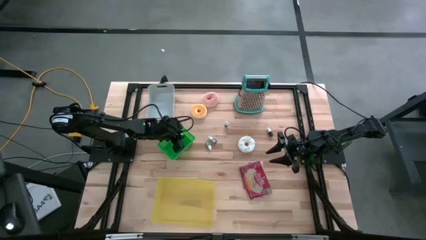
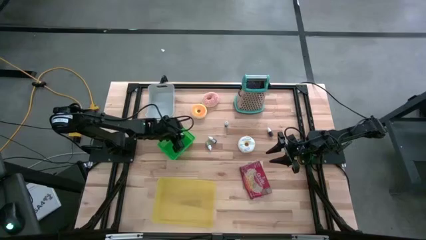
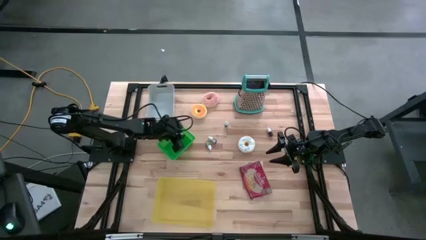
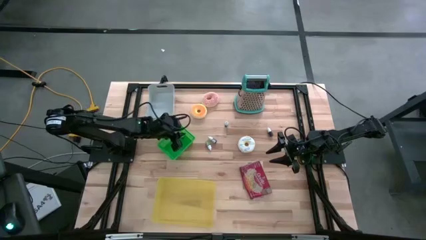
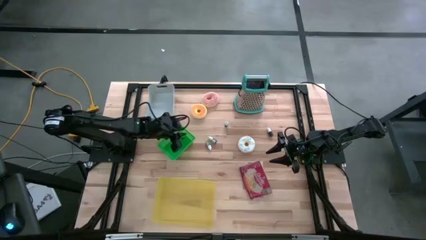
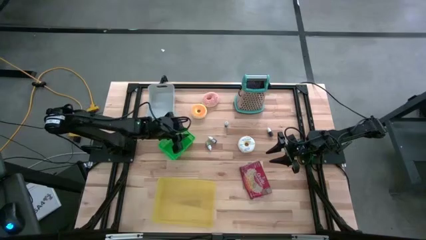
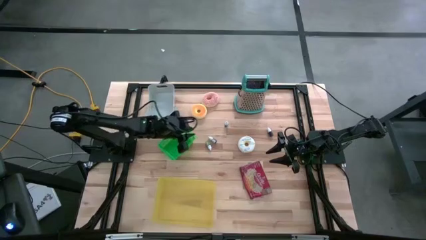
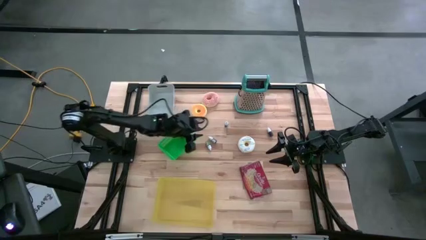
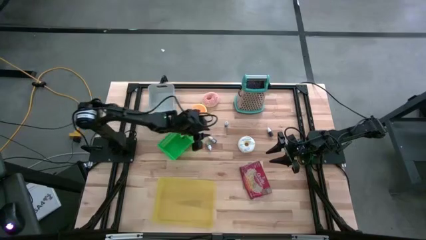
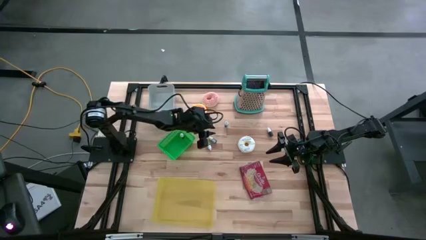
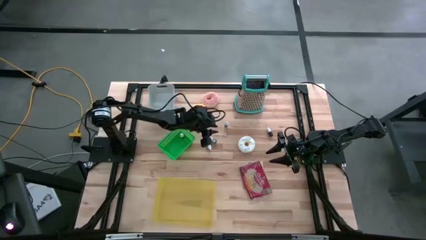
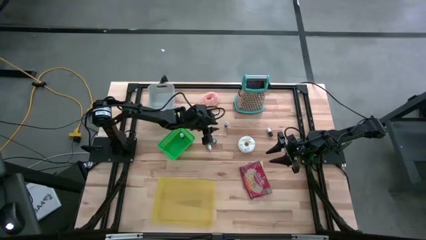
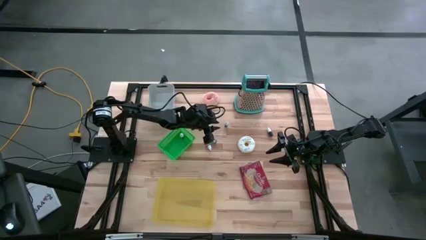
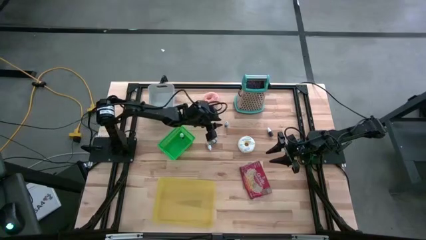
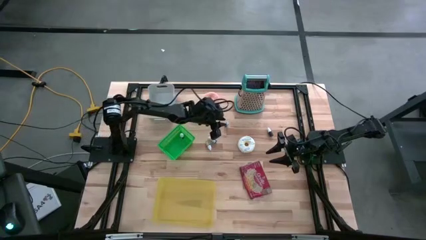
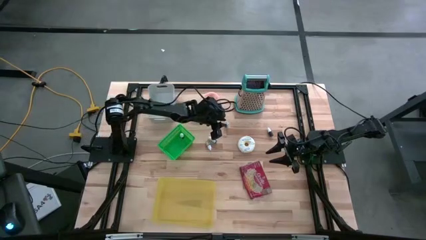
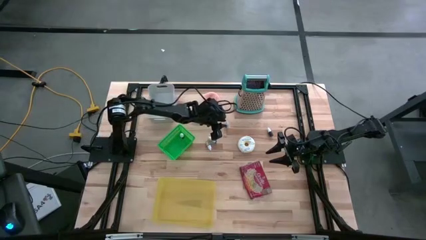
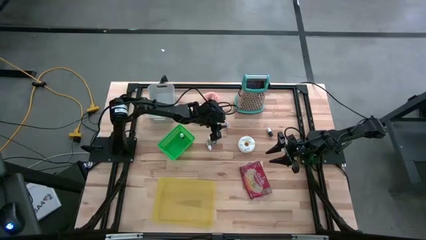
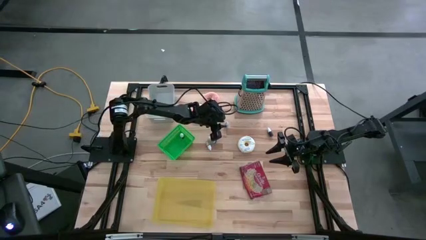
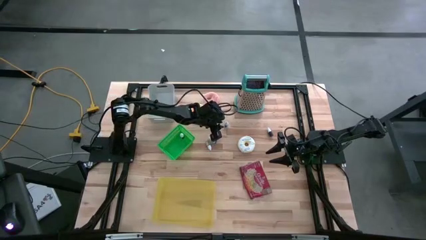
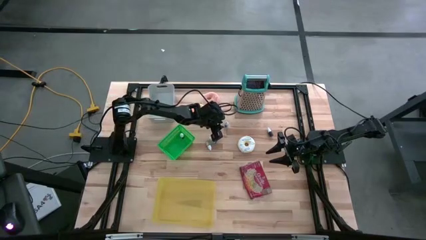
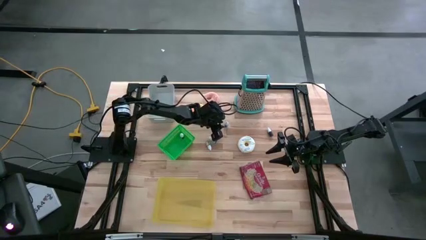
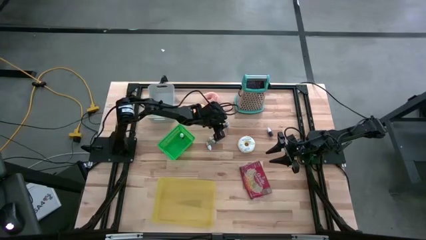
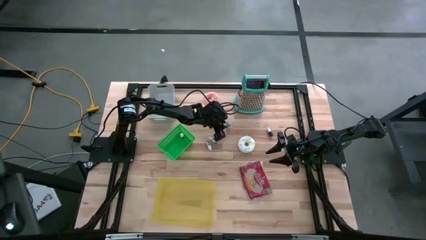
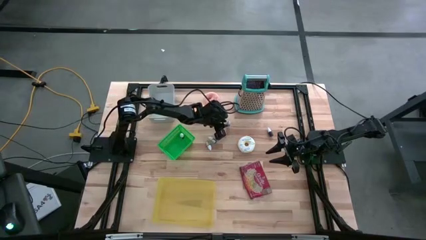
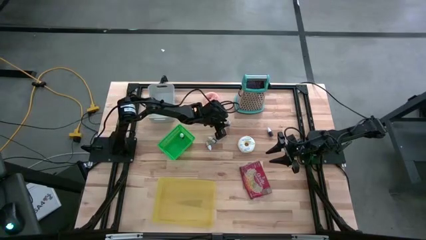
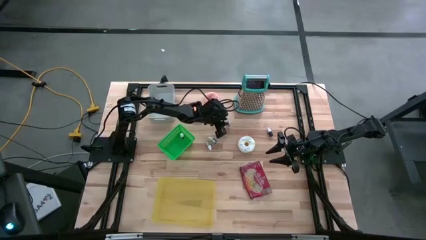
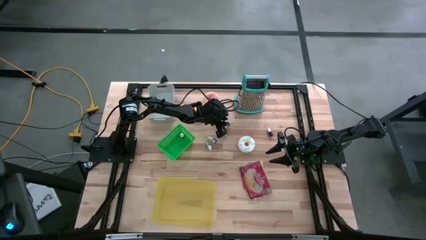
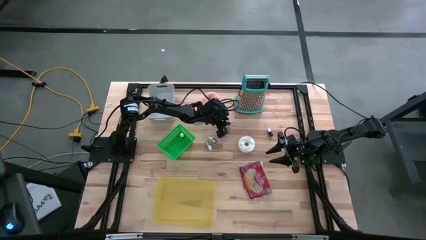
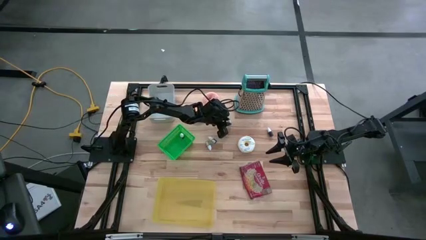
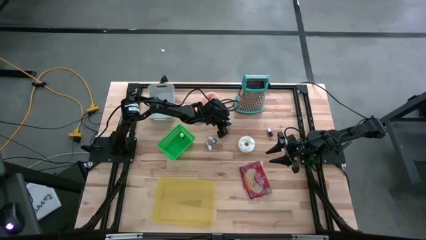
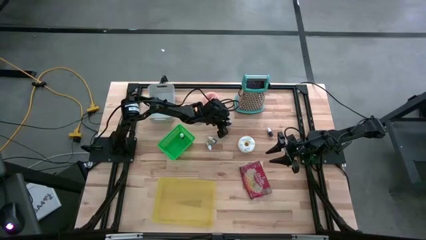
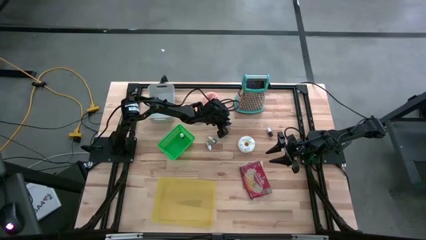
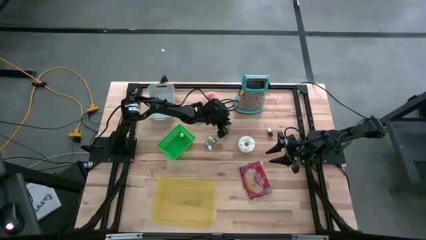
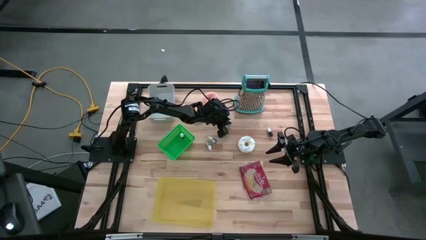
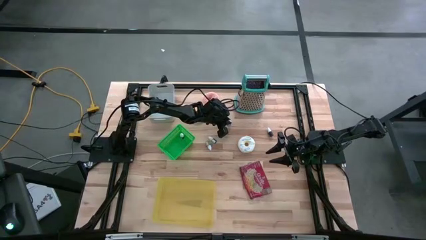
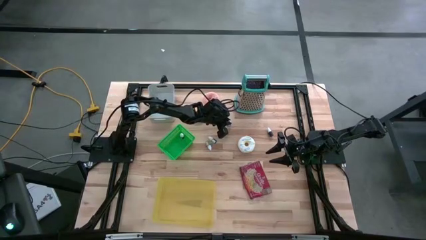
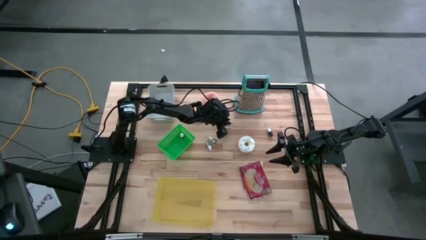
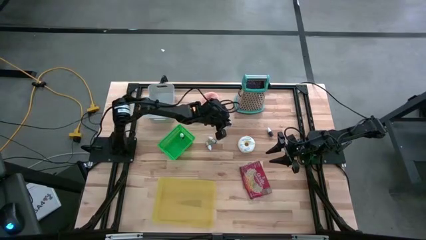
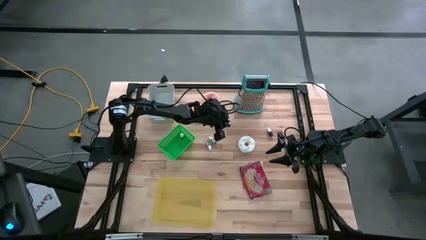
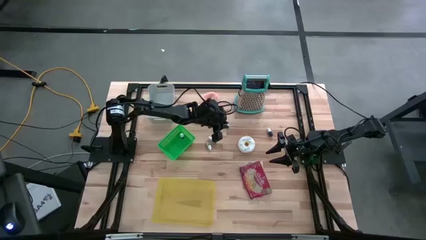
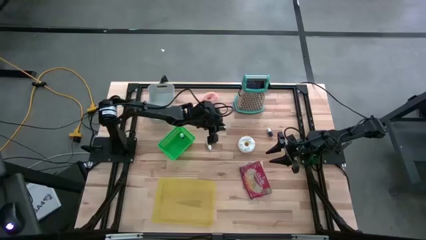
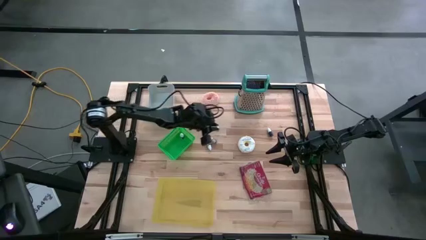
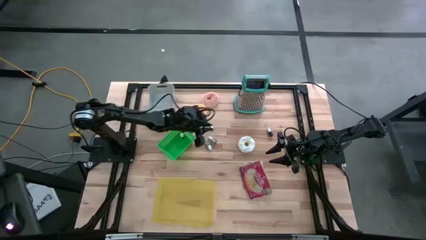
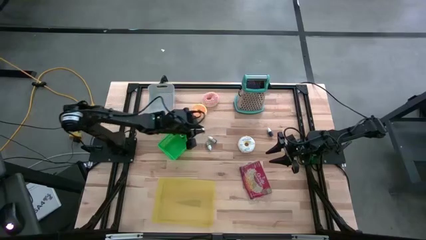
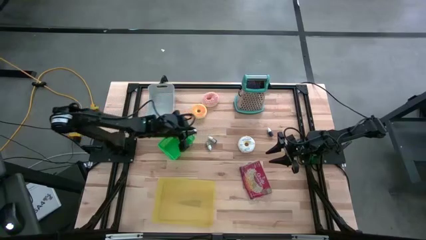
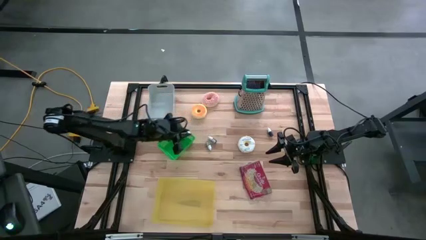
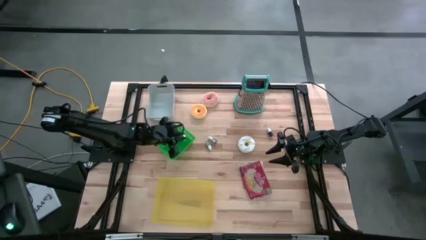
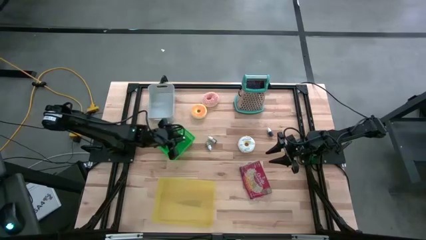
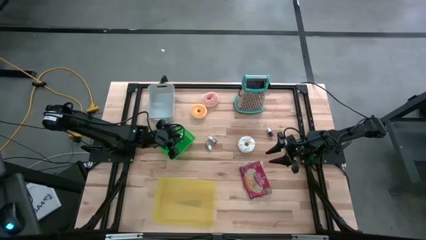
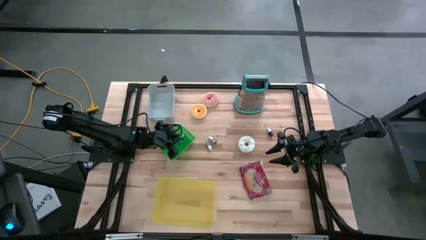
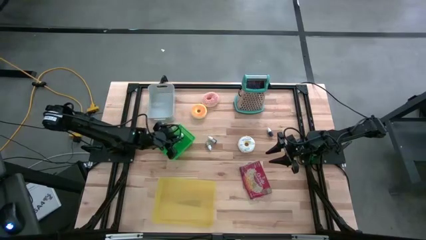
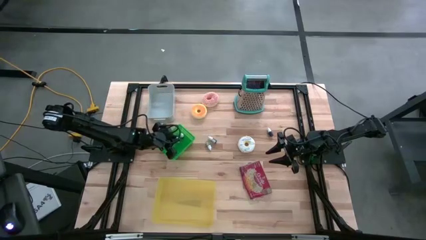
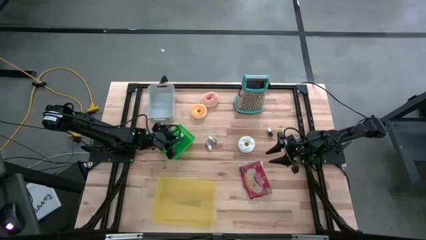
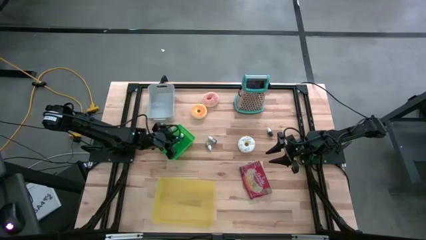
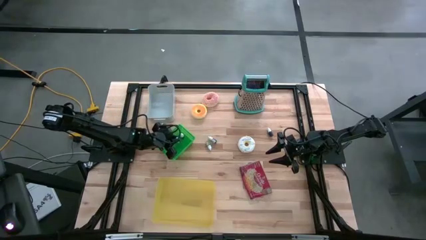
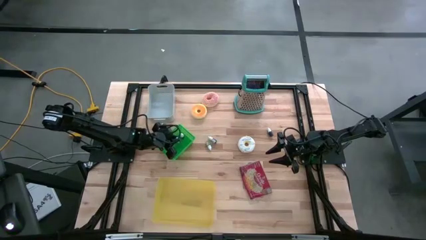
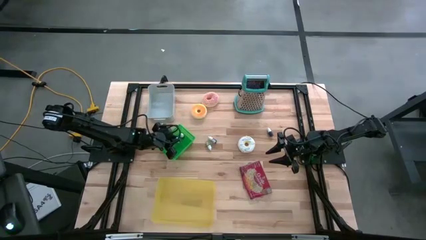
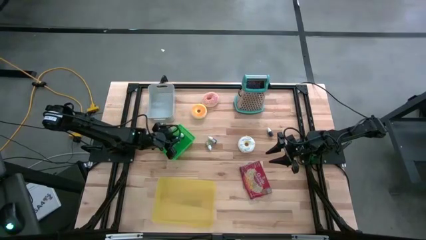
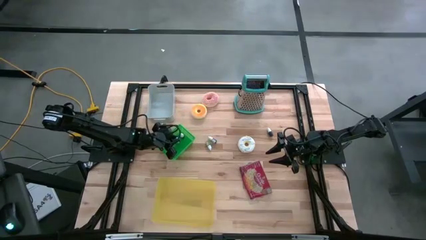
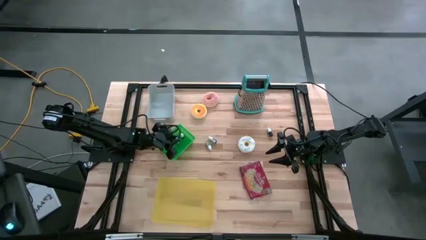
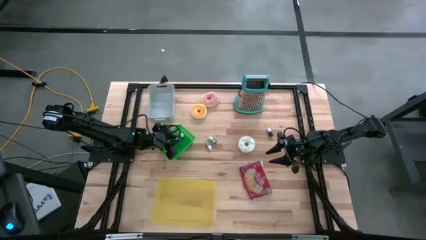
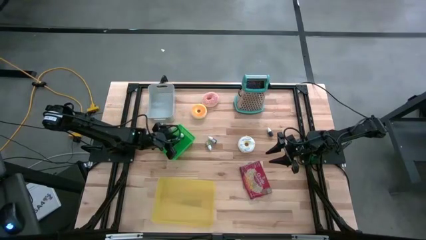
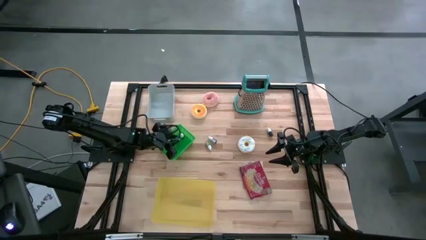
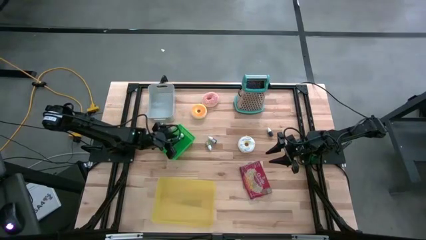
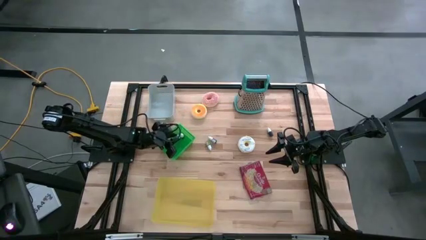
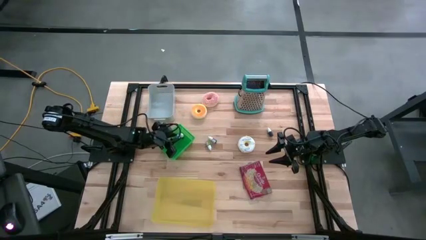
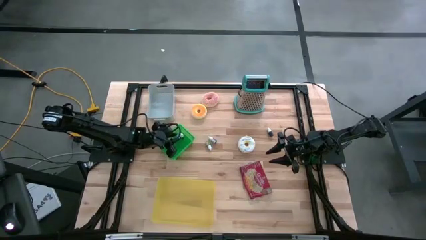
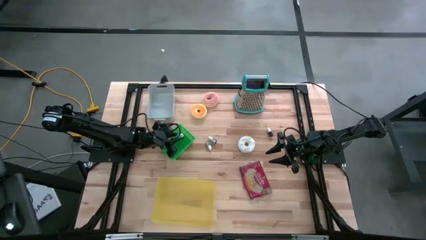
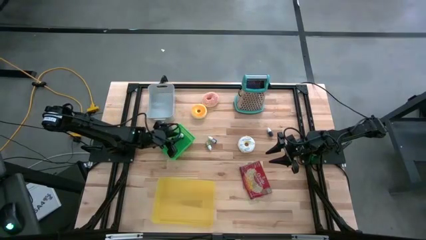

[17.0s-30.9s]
Put the blue bottle into the green basket
